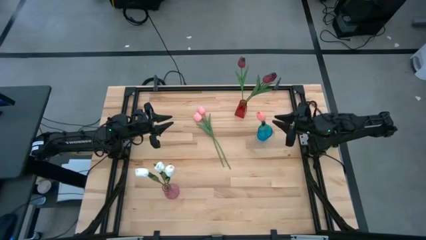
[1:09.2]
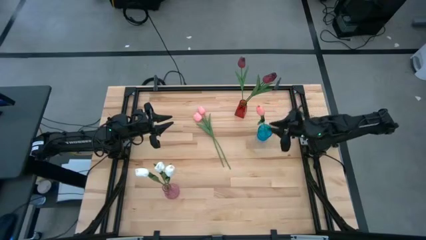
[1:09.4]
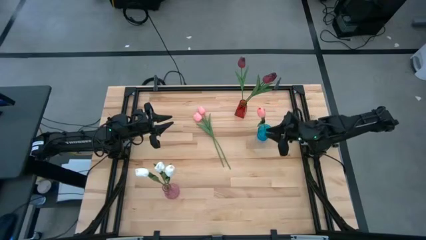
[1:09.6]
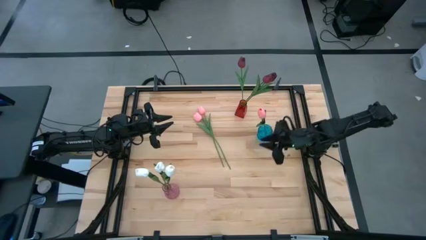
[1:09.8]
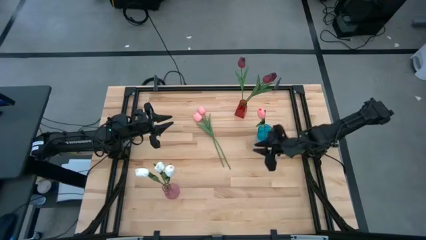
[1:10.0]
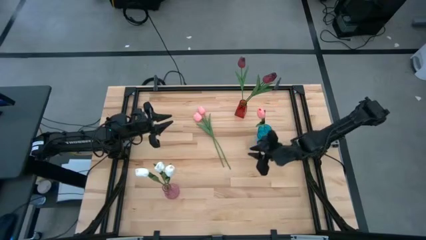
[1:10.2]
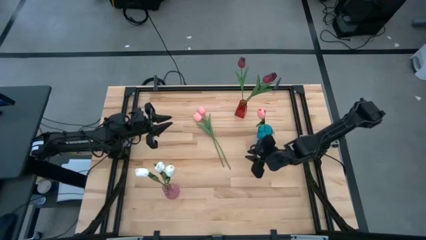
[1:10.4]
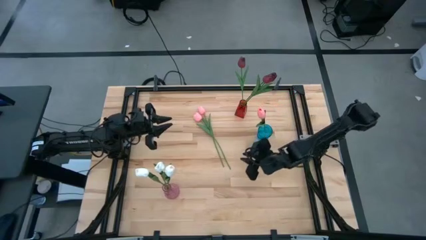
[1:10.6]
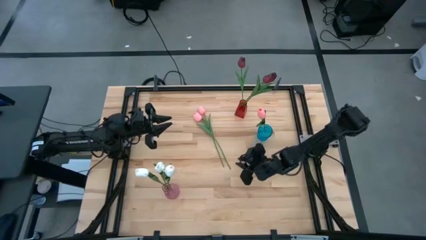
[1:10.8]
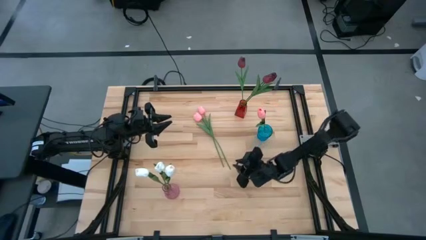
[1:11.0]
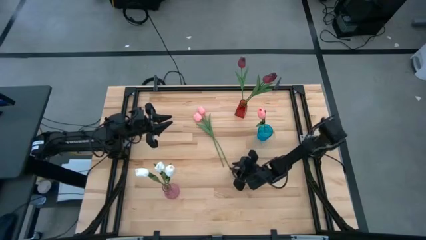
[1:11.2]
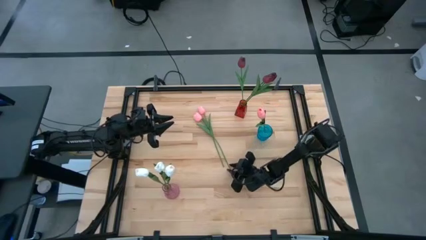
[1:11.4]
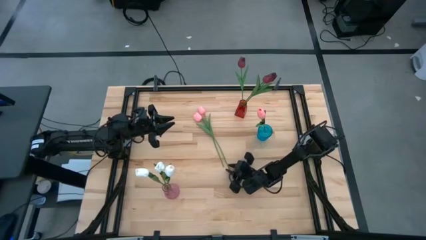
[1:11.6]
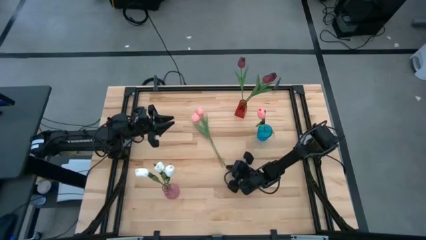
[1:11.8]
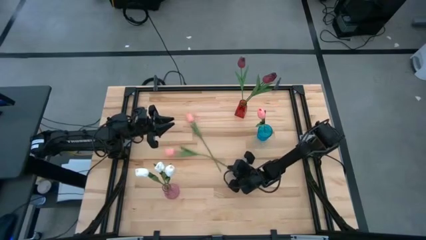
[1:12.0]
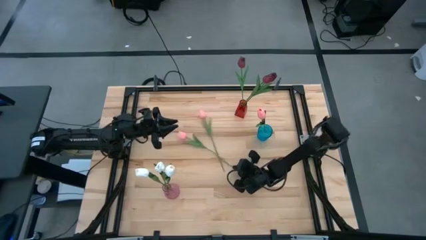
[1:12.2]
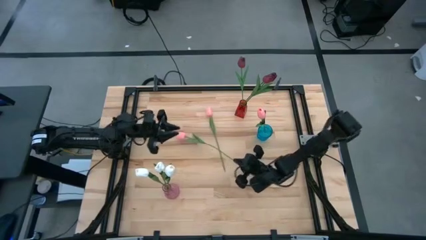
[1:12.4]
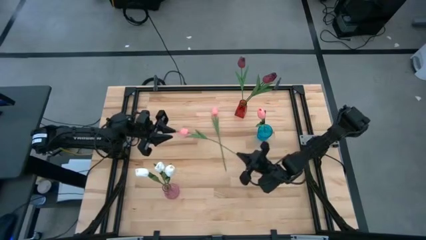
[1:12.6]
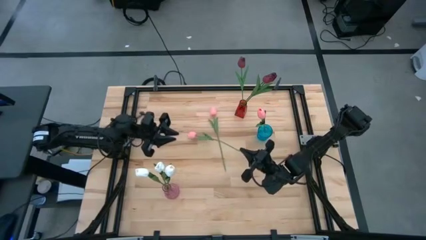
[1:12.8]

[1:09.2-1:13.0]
Task: Sort flowers into vase by color
Put the left pink tulip into the blue vase

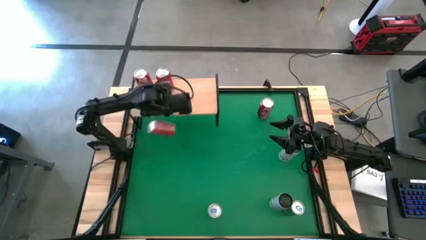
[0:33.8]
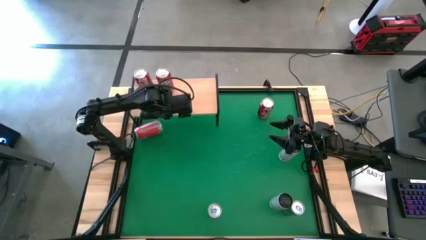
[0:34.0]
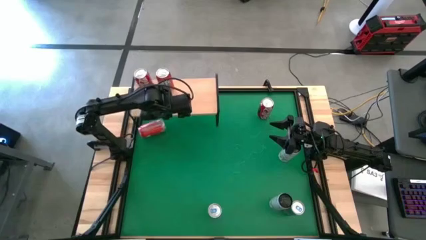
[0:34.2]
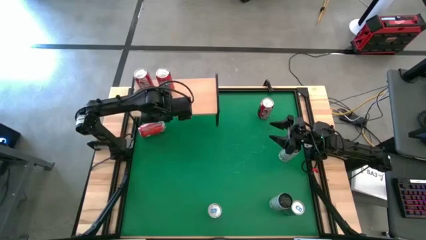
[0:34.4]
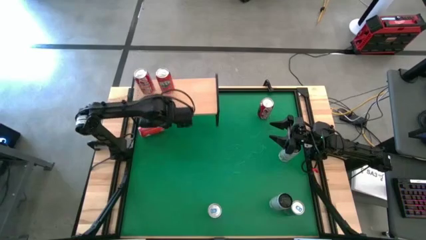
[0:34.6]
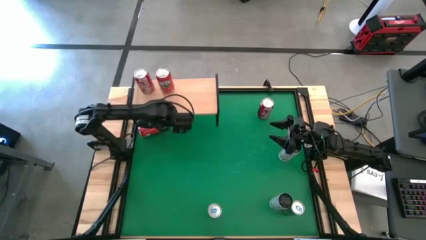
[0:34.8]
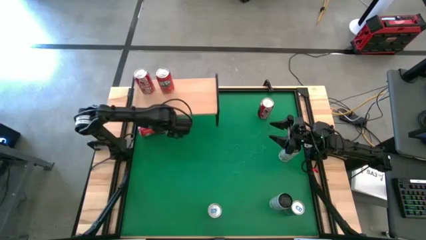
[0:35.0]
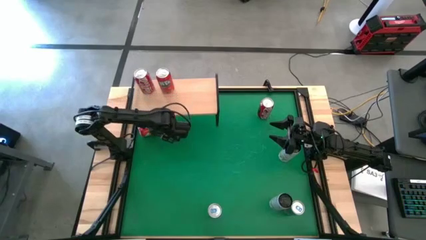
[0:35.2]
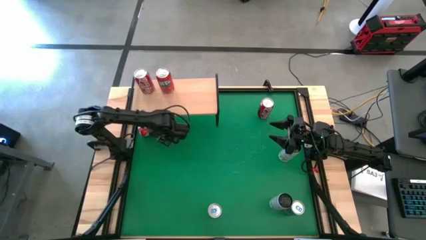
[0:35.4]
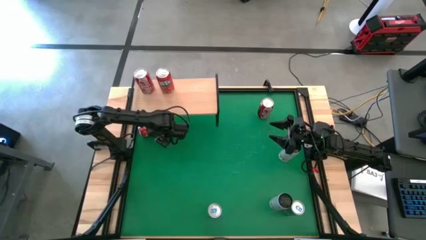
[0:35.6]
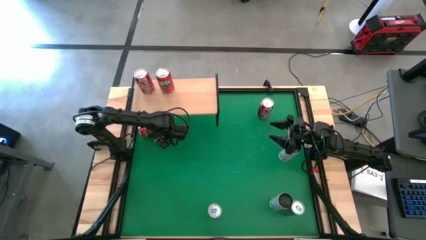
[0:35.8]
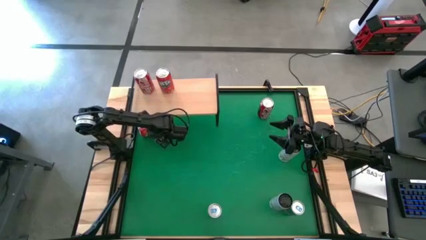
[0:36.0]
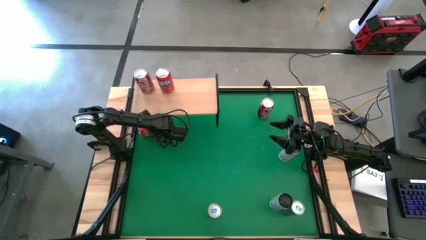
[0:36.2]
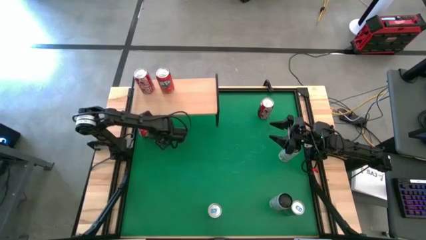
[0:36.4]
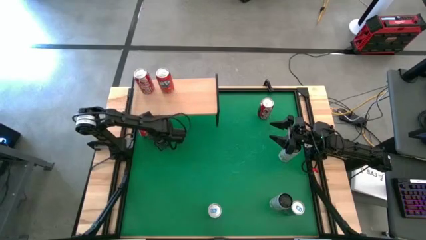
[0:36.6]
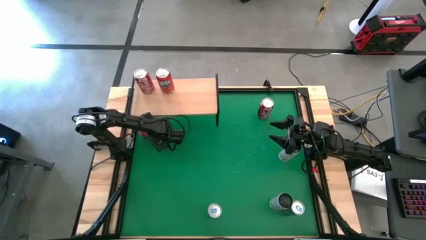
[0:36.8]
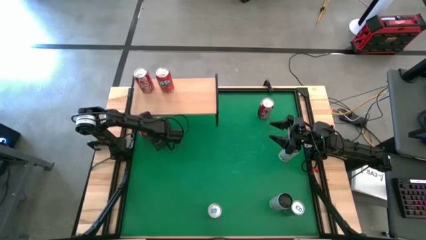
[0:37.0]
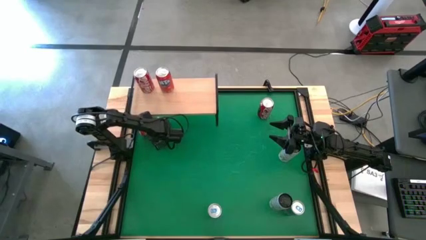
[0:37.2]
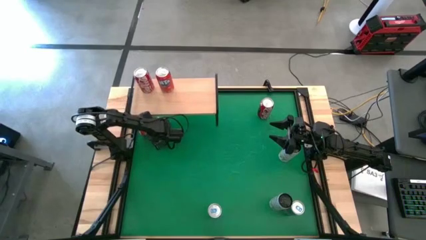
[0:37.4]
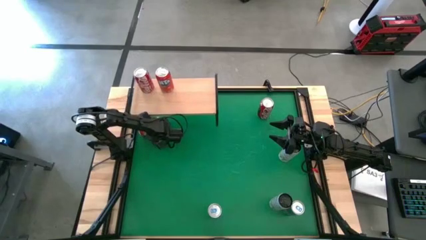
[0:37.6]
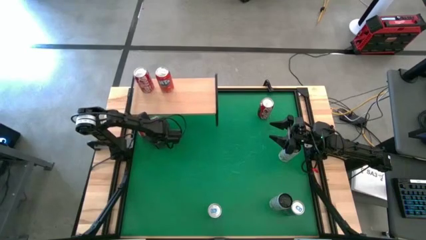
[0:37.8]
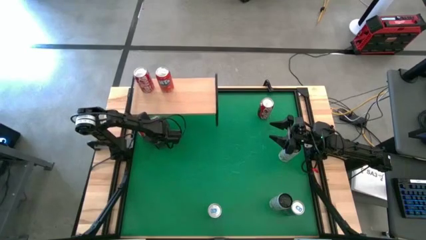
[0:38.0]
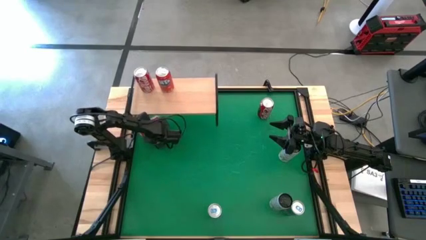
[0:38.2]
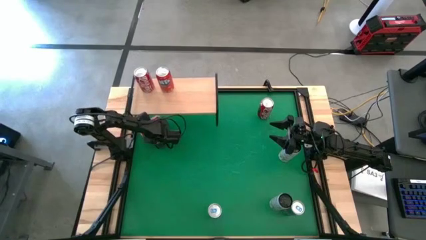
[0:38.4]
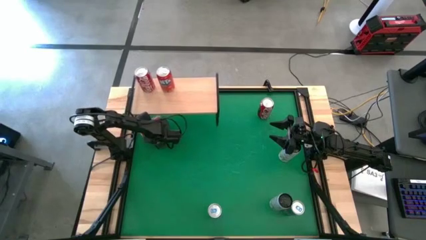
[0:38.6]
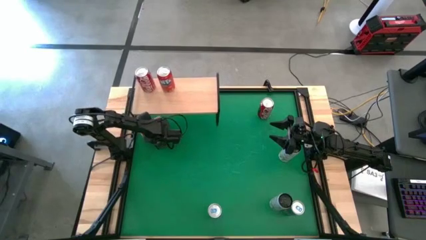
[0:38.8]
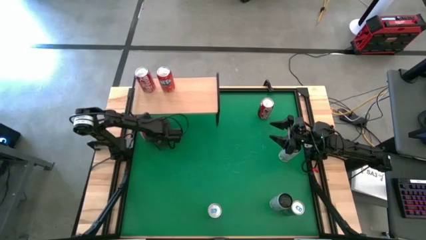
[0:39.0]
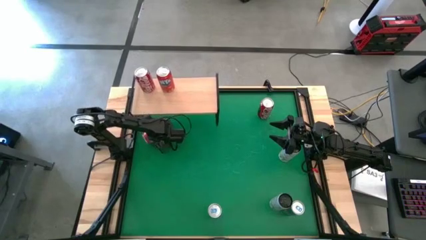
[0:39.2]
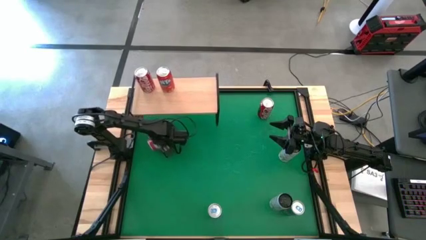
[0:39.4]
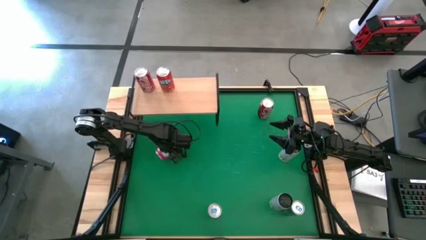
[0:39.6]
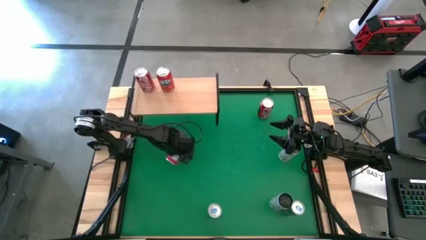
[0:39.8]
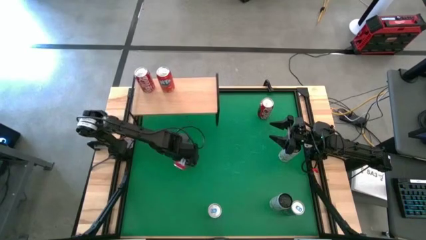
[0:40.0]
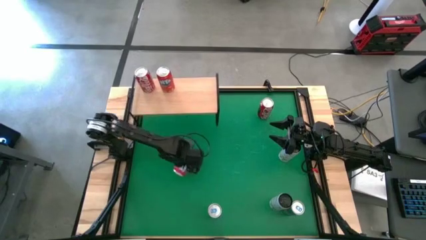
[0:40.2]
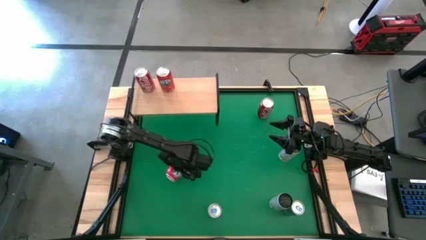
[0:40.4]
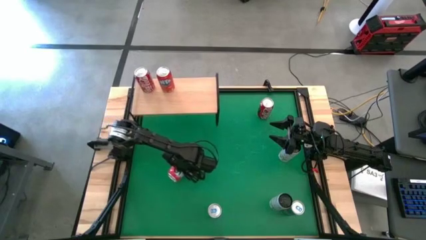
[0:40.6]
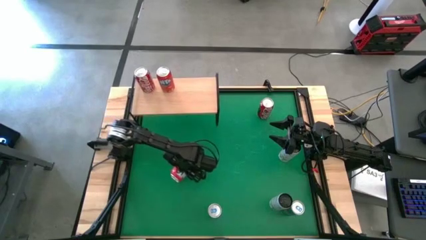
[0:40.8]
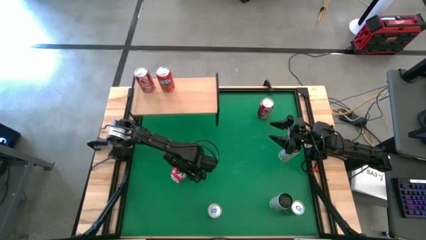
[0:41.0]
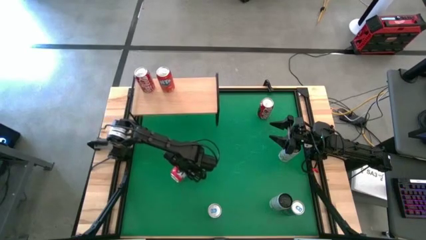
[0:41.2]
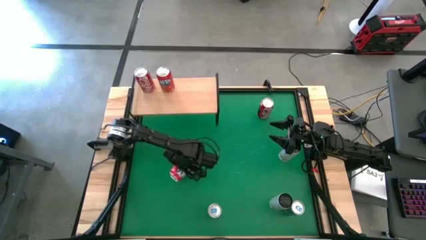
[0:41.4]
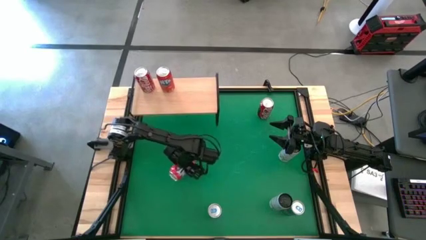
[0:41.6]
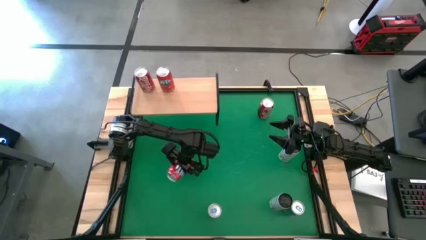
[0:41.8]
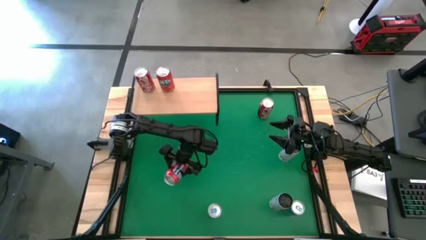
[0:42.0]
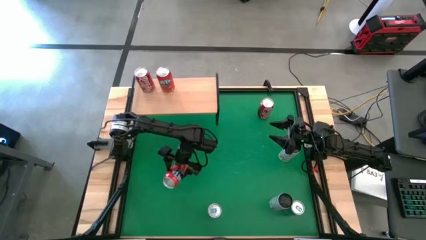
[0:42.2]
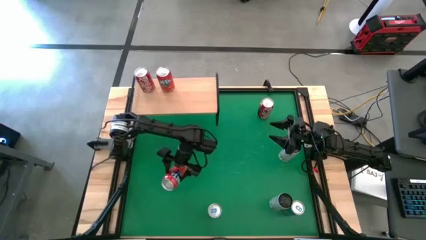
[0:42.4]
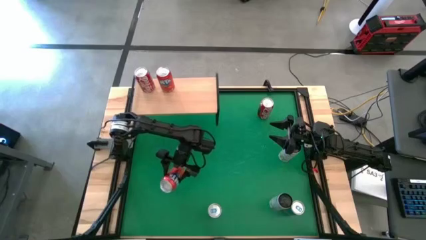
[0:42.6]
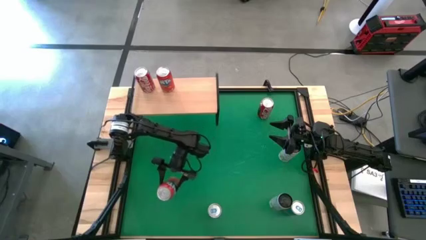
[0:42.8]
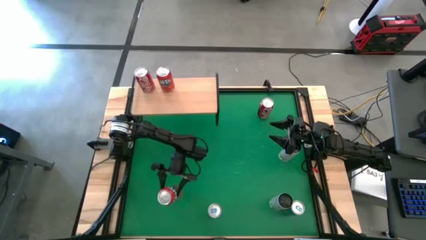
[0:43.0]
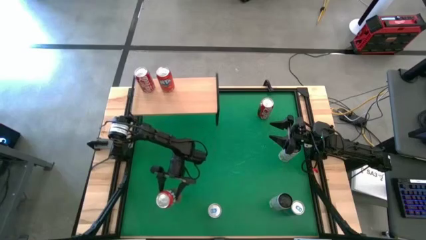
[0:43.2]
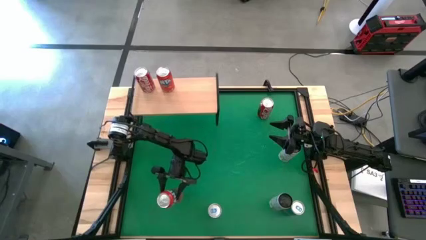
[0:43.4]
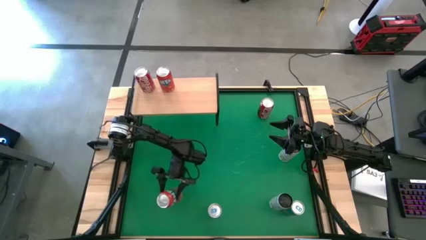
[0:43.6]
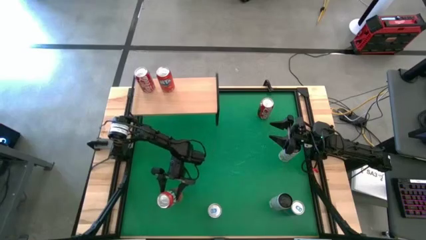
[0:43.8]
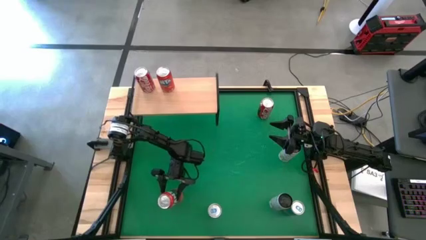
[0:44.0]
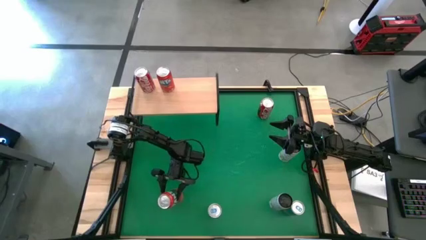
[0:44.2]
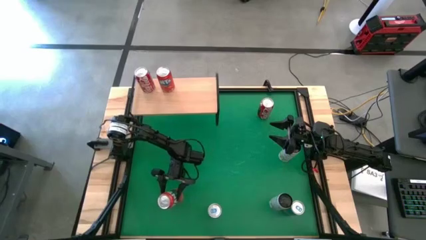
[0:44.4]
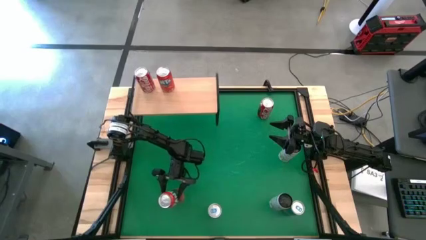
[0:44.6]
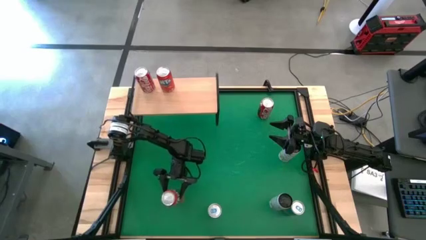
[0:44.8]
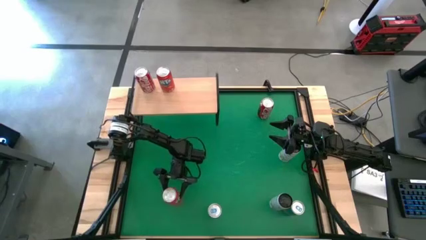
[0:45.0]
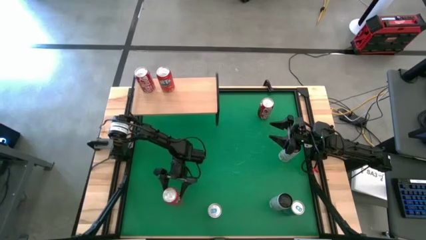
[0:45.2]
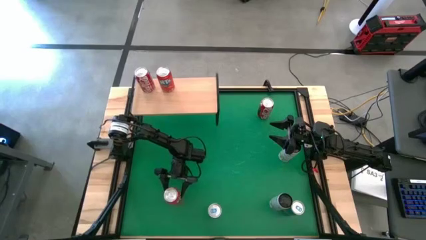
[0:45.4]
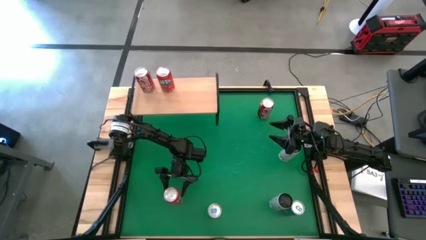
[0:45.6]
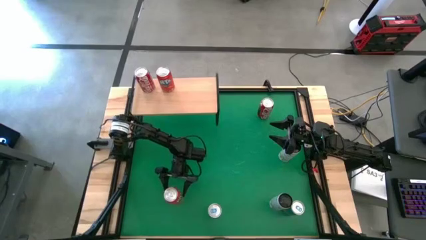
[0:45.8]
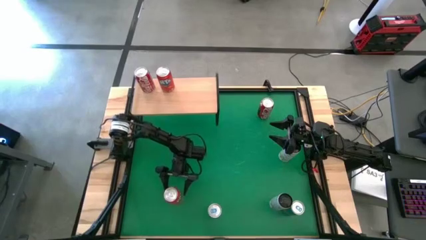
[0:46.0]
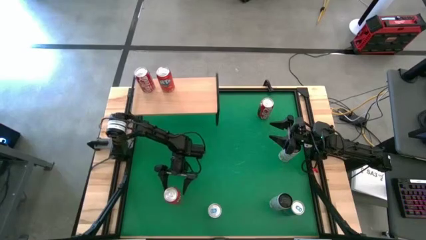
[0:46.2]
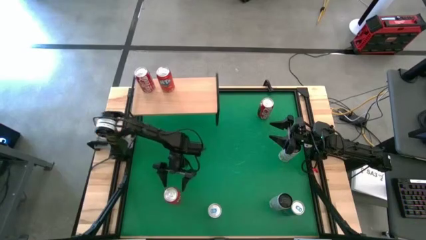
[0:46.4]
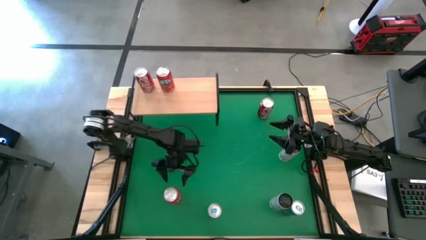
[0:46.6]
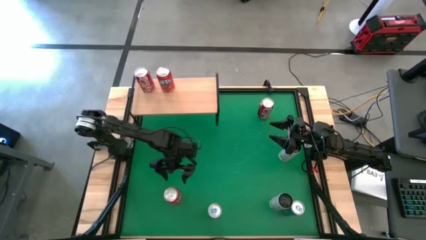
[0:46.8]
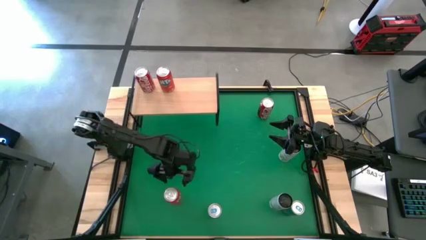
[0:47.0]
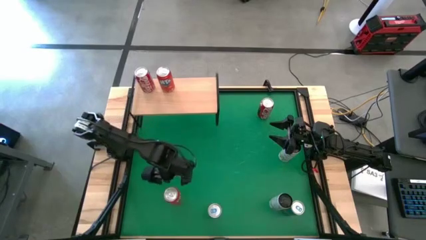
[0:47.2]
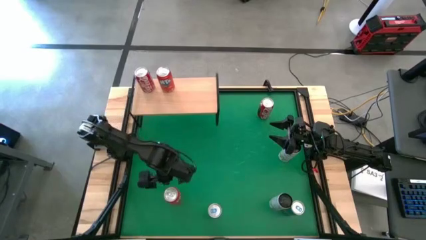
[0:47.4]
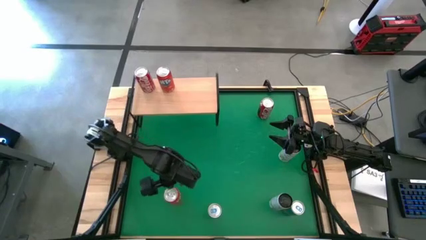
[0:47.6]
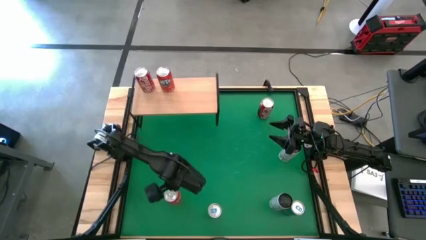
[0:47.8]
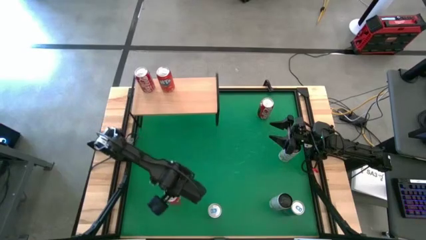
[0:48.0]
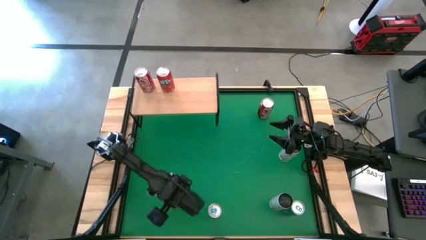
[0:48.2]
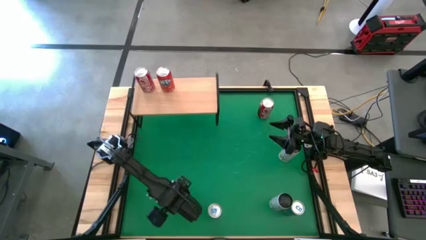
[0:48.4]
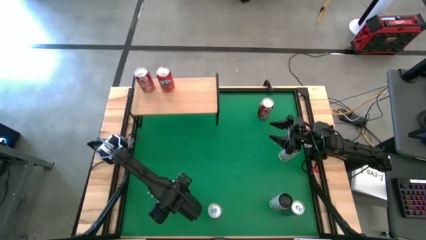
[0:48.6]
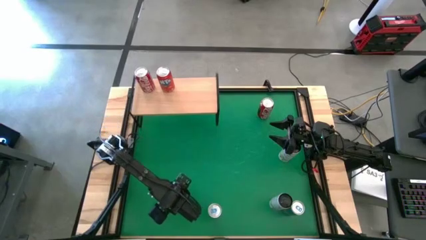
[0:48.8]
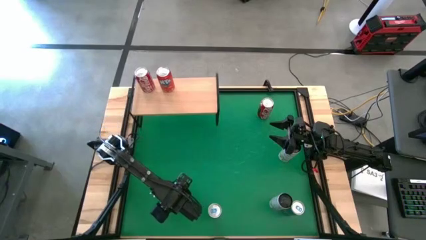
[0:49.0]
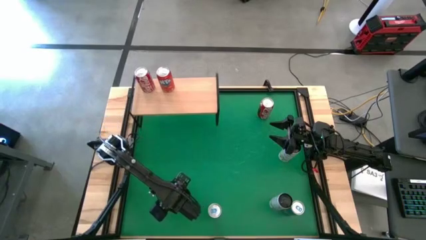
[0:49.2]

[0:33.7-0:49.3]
Task: Place canned beverage on shelf
Put the red soda can aligned with the other red soda can on the shelf
